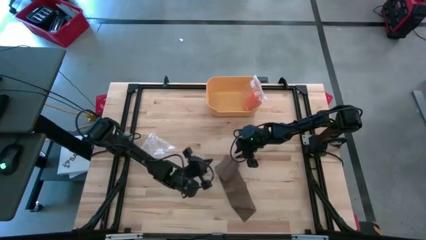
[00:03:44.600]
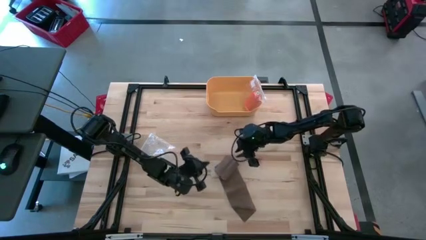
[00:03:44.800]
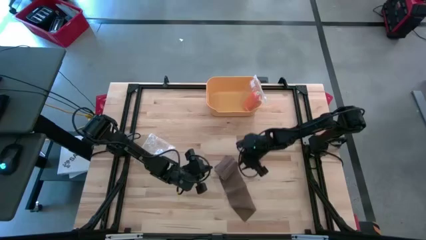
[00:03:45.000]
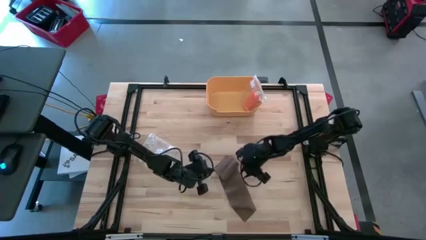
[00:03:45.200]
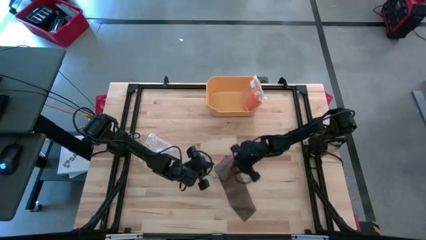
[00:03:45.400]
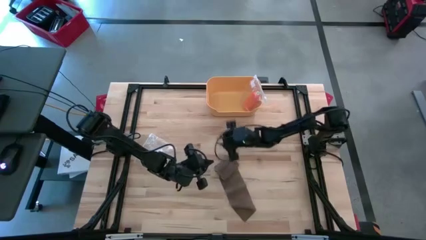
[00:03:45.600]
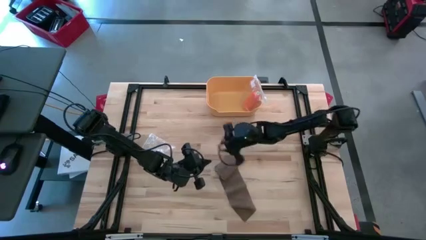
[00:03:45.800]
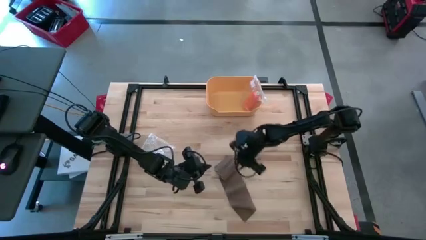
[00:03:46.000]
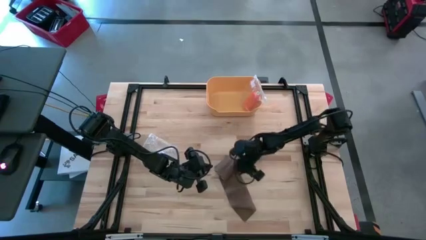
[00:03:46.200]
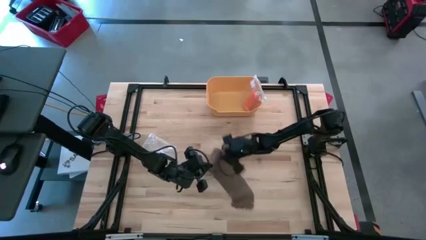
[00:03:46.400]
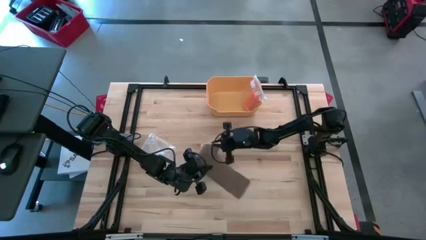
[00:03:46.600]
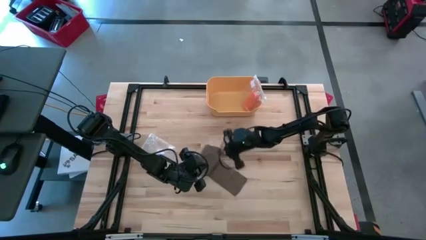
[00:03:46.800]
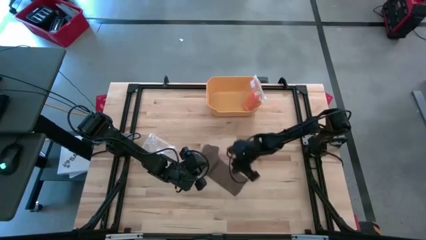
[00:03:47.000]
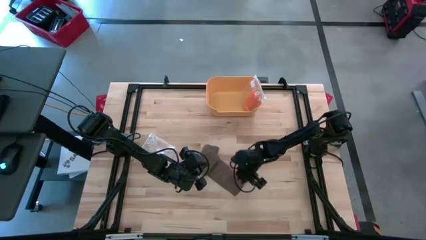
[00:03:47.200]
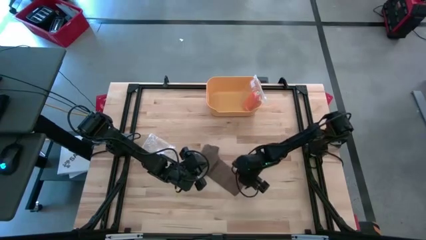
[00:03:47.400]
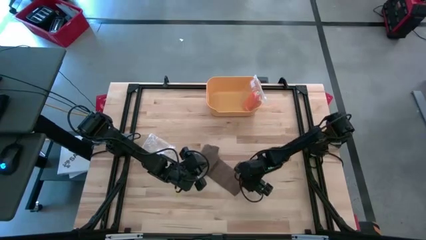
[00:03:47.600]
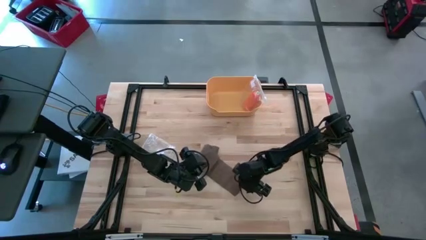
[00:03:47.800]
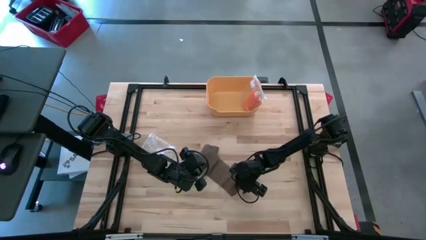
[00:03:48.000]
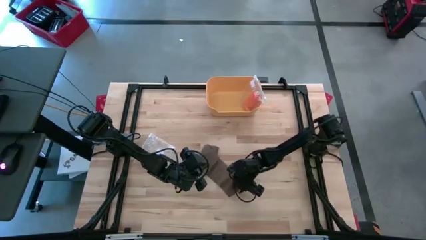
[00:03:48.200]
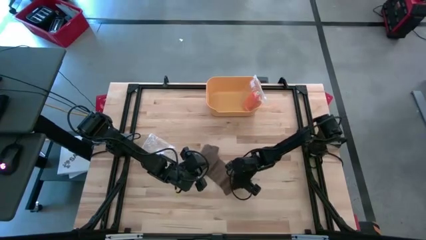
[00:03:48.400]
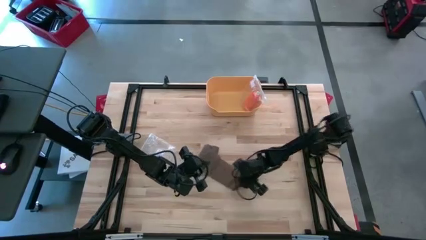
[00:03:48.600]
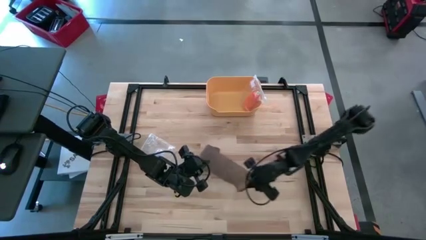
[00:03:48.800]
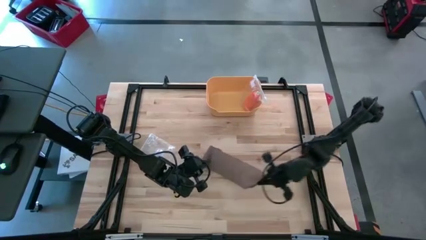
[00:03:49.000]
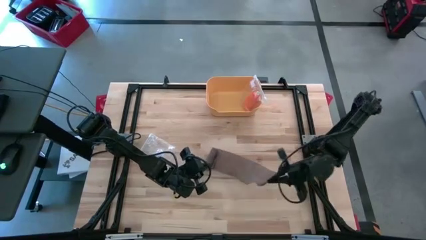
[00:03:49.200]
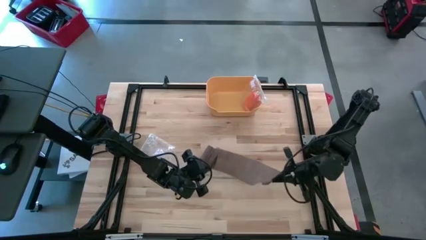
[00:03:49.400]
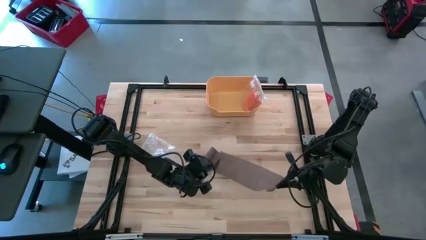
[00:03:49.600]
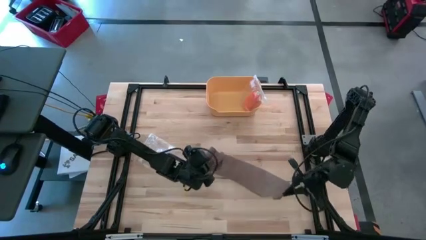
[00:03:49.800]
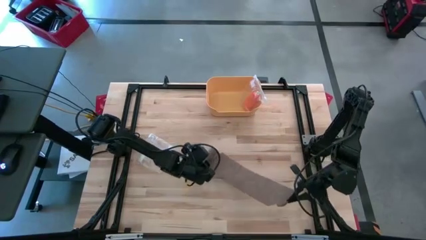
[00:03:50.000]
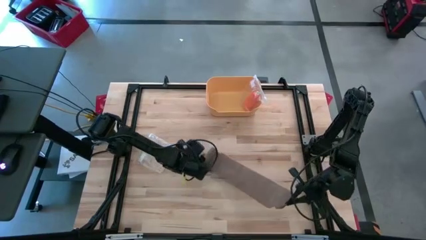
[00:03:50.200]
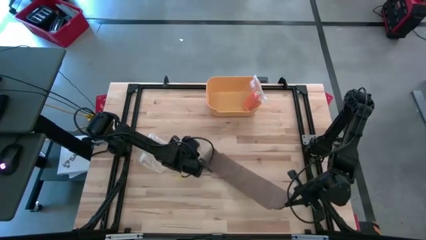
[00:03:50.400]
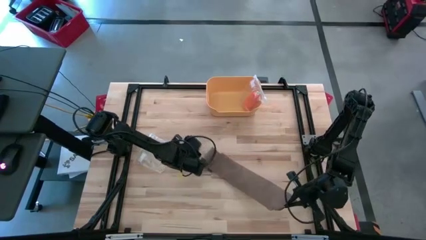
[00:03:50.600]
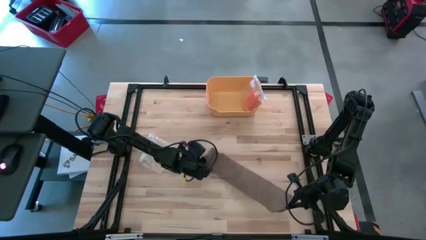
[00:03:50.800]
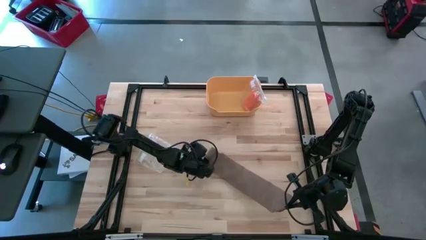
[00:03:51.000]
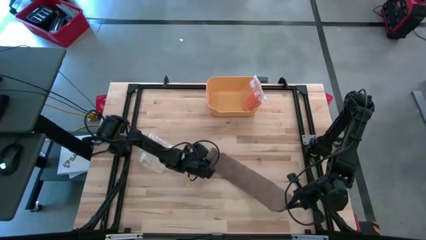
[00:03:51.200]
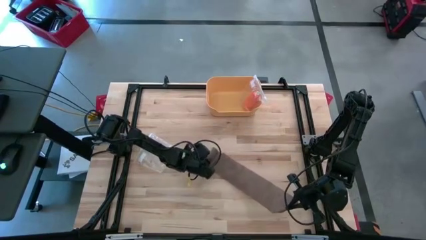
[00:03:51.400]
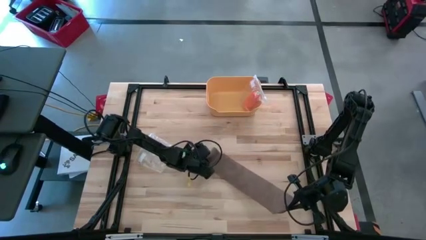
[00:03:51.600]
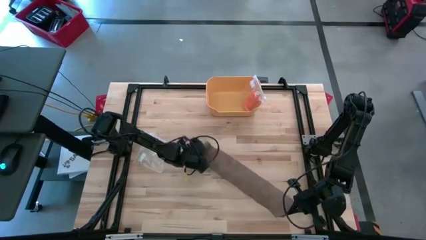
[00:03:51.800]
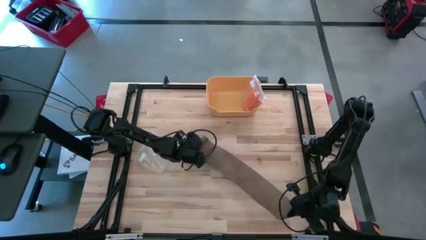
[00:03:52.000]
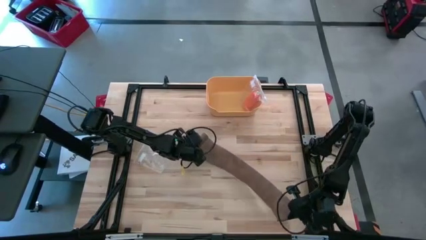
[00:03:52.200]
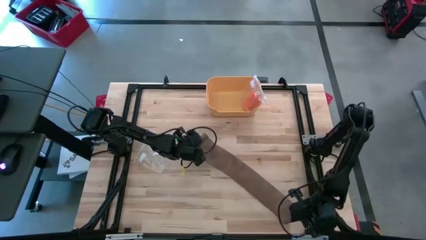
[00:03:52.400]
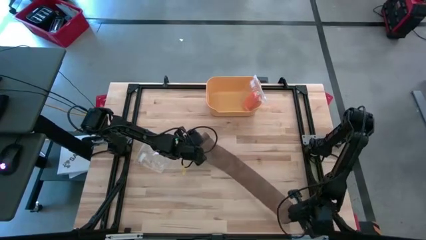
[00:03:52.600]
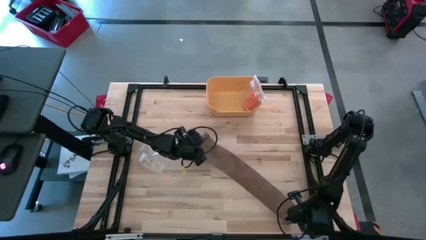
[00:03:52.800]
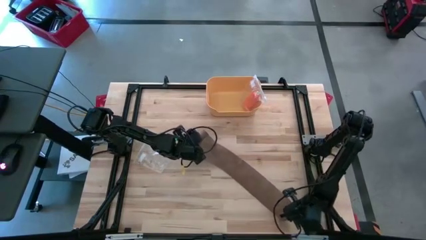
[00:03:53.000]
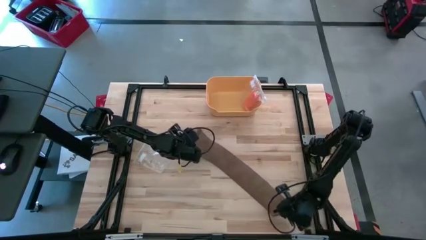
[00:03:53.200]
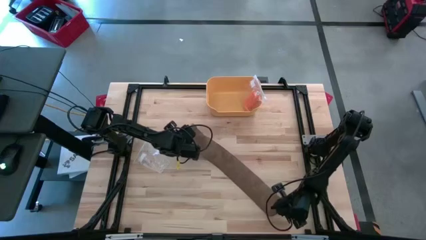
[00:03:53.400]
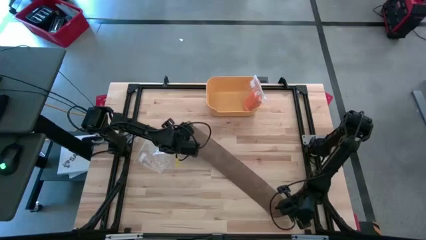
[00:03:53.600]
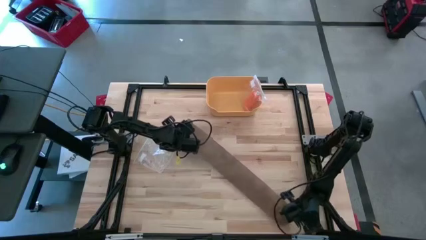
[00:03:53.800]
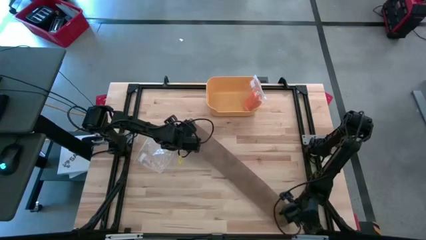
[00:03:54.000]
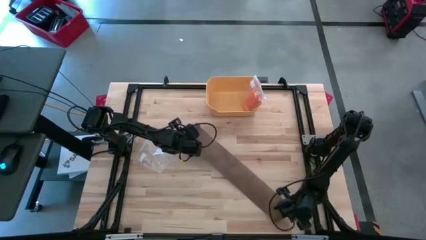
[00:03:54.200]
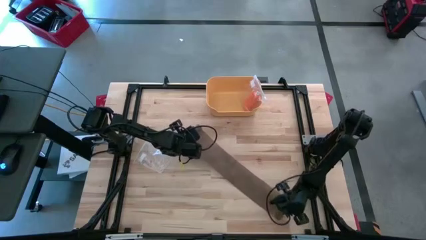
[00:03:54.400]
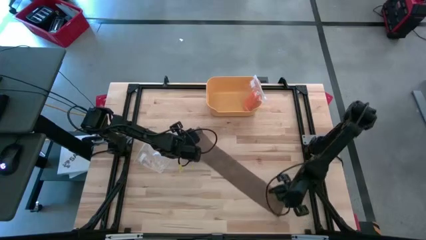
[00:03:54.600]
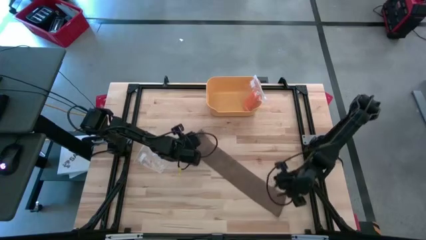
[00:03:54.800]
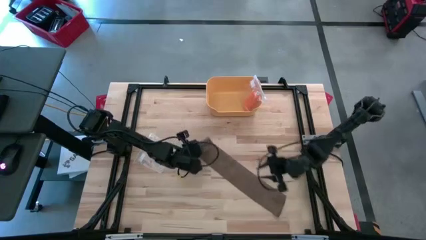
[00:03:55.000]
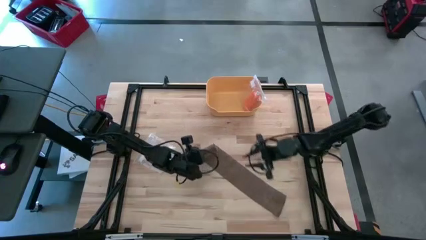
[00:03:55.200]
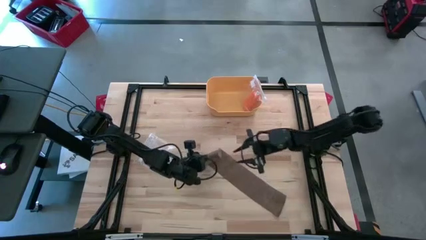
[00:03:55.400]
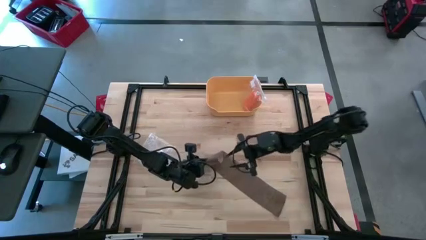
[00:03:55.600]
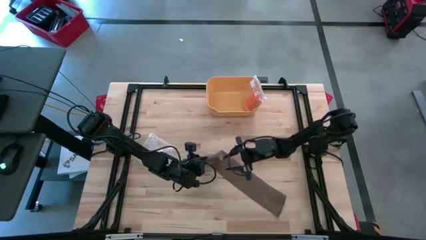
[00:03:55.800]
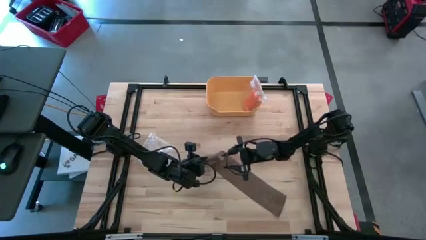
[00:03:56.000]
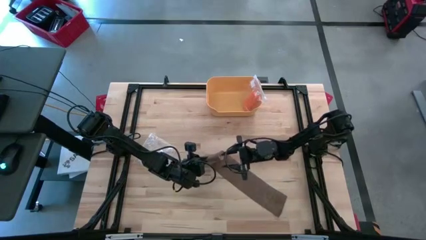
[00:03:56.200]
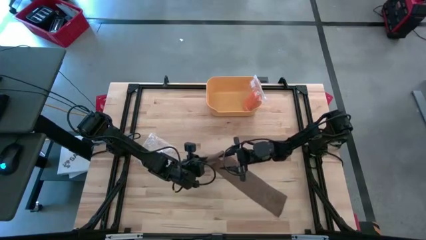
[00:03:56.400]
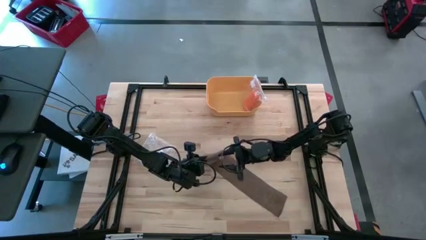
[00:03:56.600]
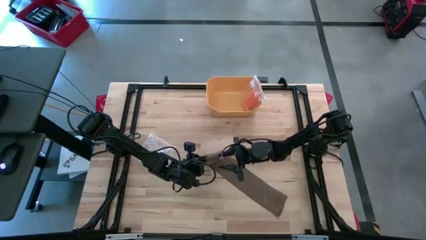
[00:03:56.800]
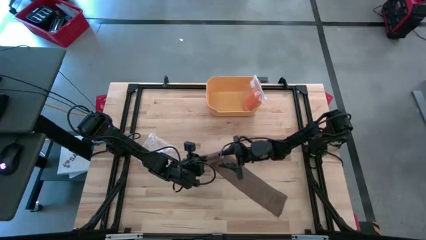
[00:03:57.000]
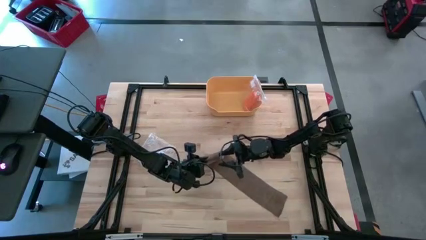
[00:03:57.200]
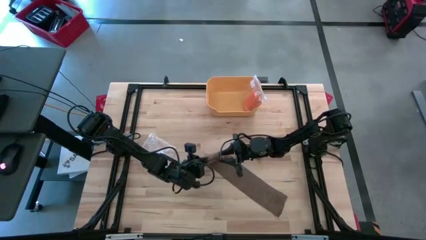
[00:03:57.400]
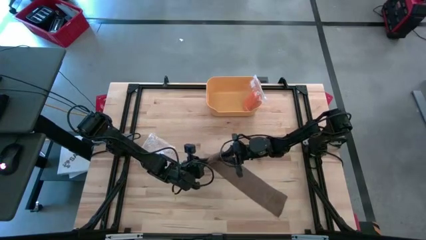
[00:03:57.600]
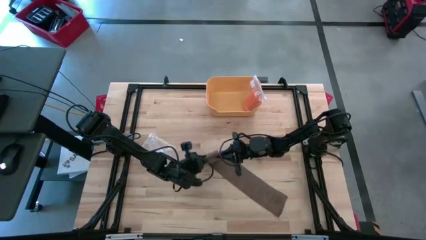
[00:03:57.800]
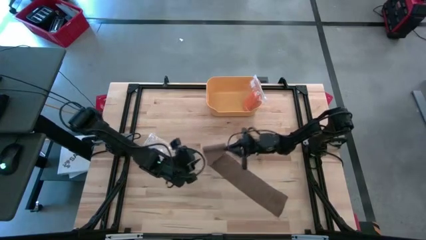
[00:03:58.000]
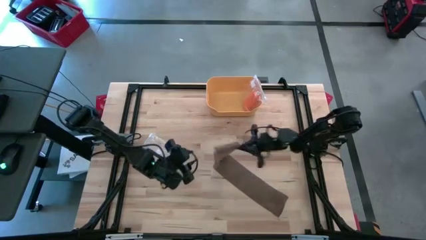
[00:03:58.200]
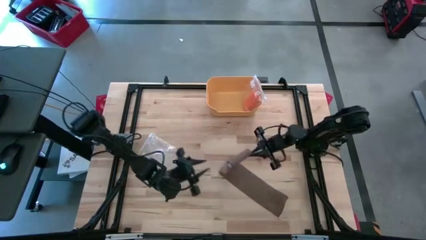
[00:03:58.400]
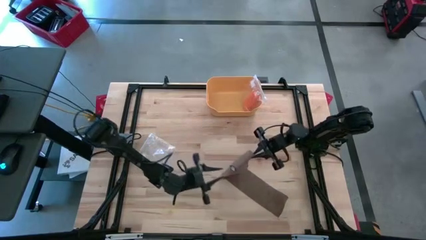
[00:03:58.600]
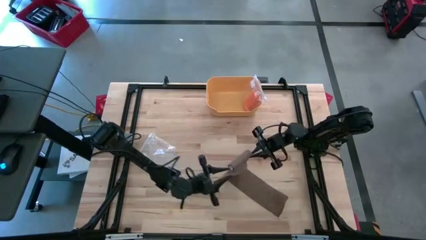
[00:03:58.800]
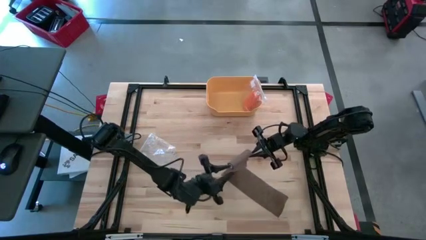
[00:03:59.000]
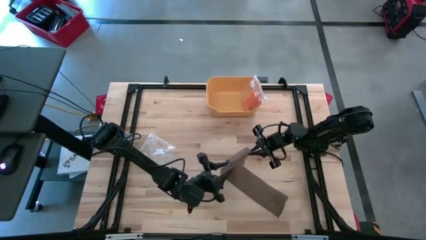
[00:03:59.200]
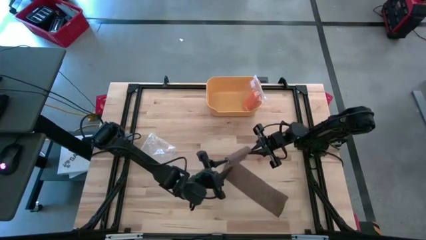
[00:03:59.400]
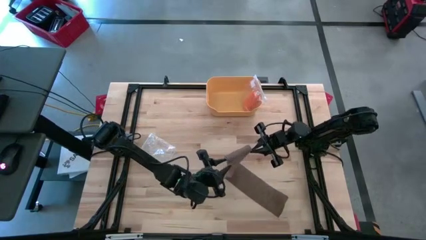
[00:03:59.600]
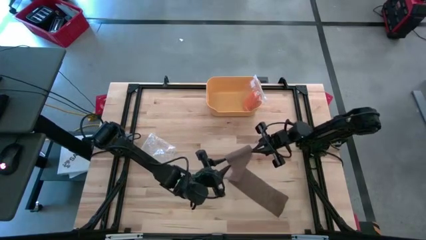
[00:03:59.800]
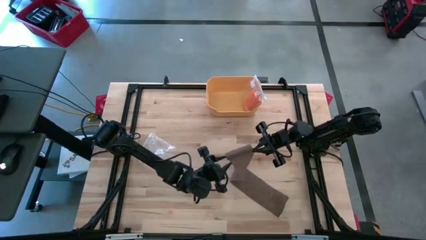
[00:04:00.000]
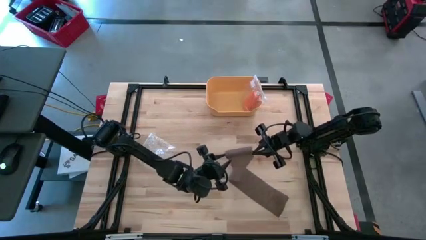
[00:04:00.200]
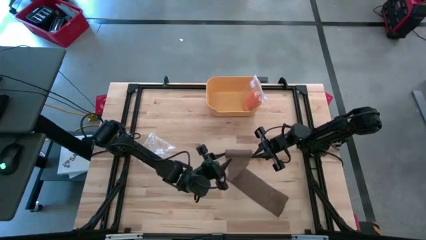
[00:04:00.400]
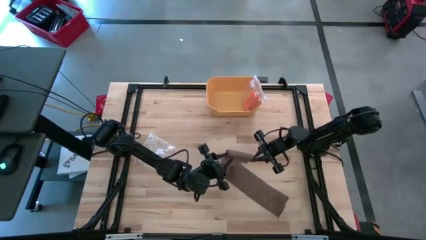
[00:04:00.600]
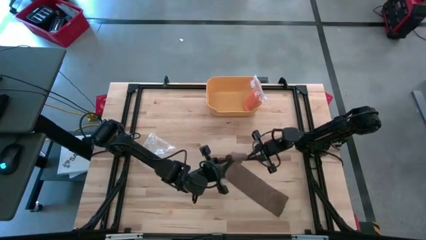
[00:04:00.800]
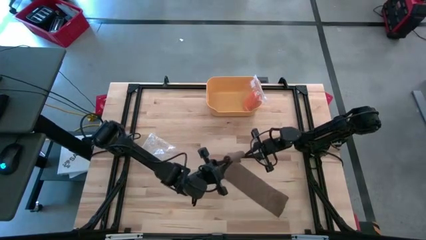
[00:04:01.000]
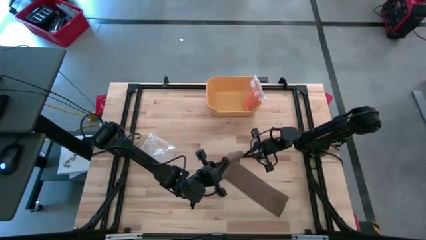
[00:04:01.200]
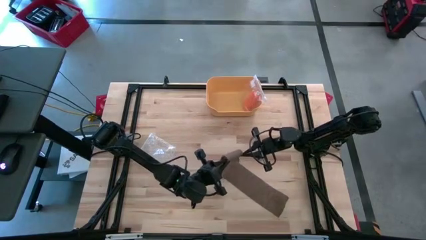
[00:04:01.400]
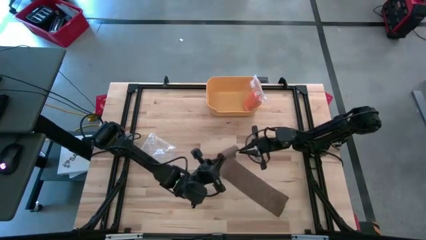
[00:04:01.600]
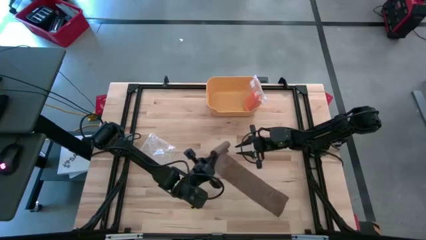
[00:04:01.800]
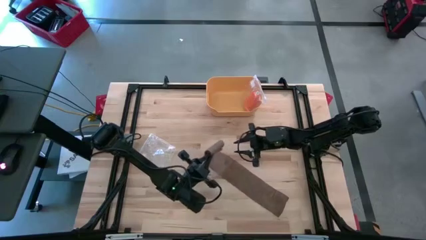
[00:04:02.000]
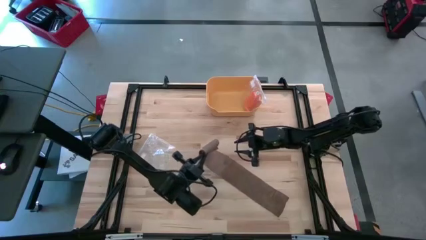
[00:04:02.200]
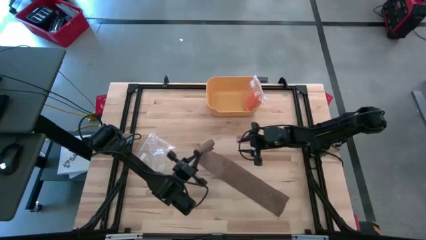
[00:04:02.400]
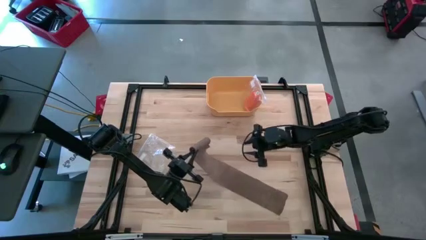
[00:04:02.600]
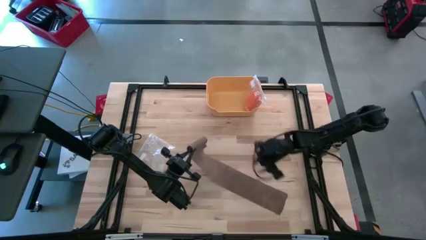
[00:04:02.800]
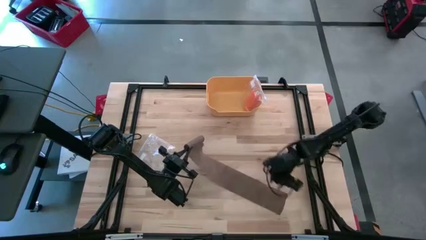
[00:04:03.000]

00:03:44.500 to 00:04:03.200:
Task: Roll bandage
Roll the brown bandage
